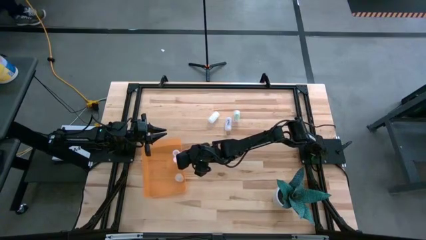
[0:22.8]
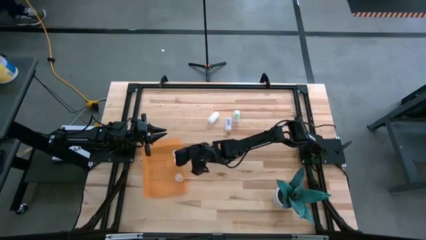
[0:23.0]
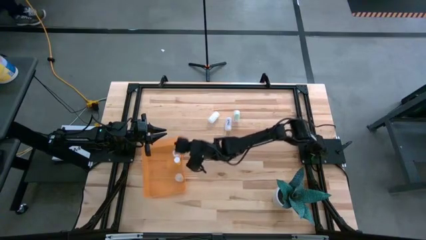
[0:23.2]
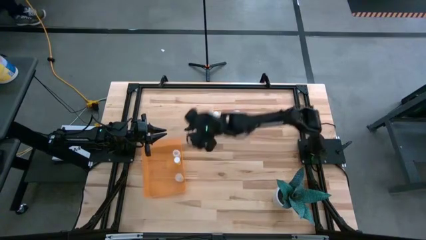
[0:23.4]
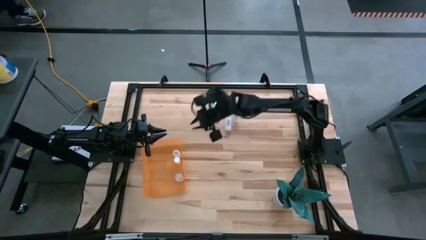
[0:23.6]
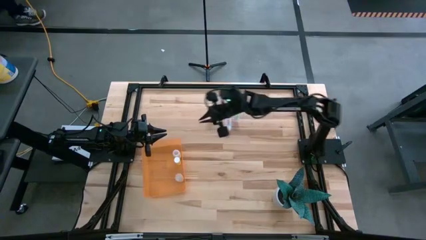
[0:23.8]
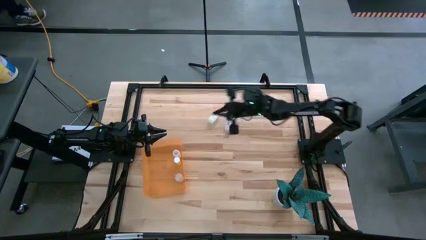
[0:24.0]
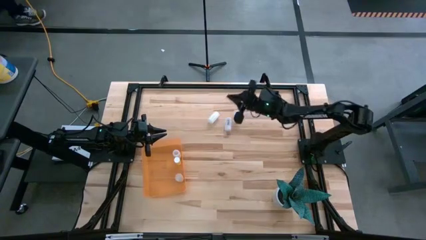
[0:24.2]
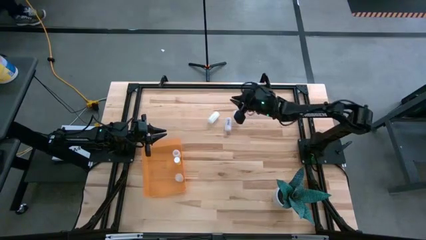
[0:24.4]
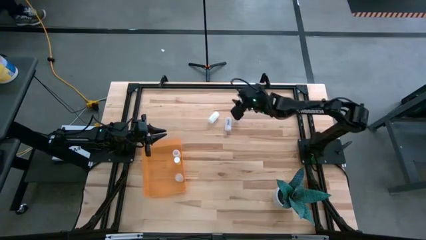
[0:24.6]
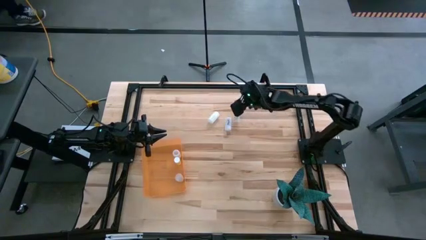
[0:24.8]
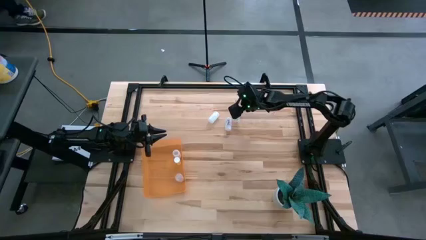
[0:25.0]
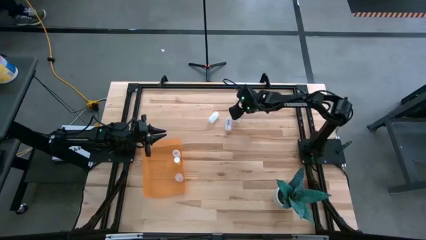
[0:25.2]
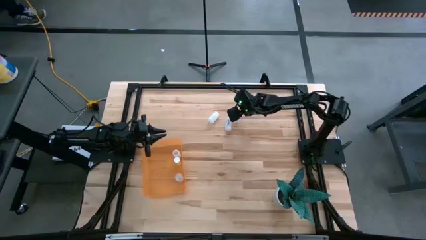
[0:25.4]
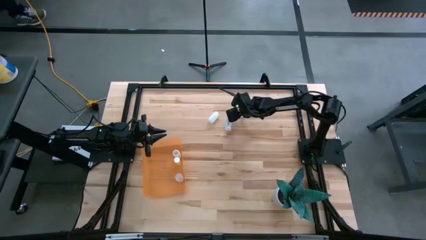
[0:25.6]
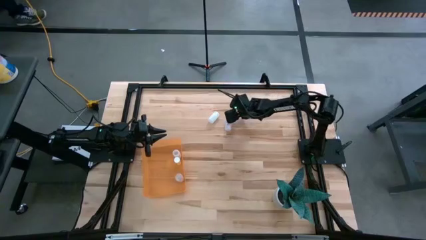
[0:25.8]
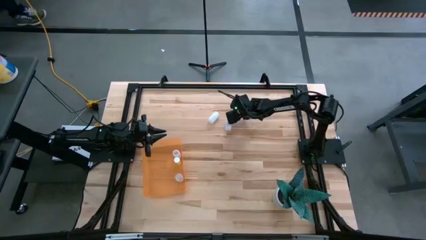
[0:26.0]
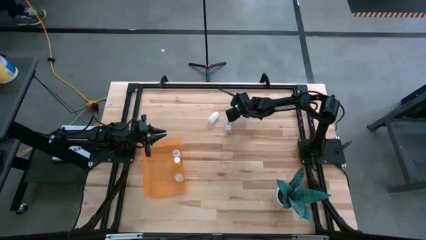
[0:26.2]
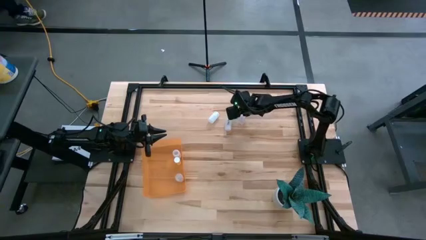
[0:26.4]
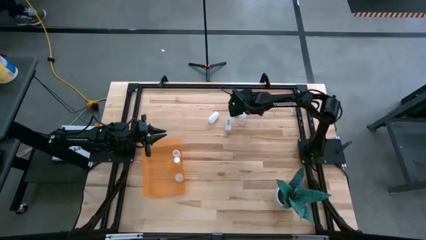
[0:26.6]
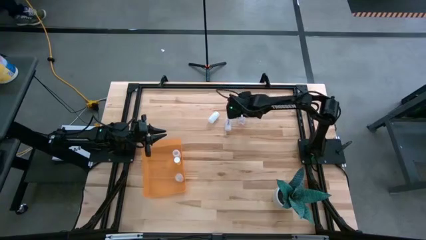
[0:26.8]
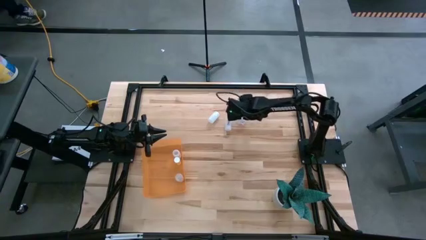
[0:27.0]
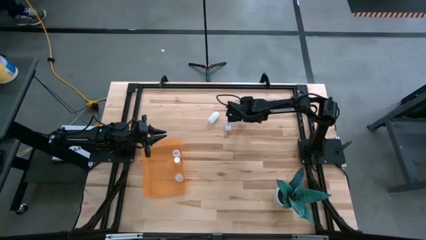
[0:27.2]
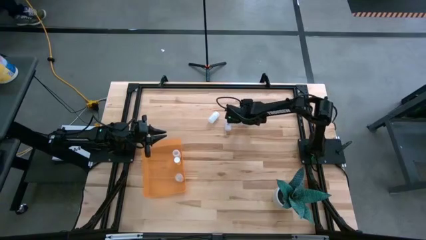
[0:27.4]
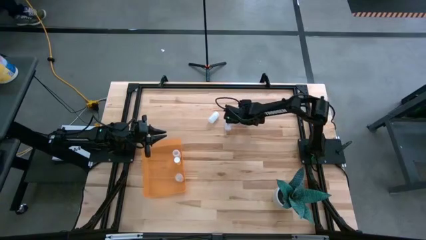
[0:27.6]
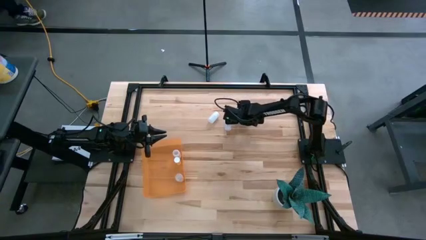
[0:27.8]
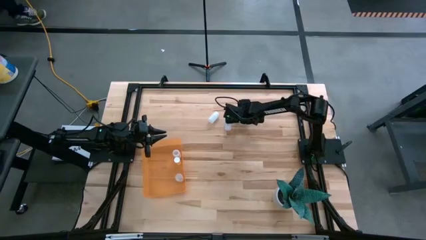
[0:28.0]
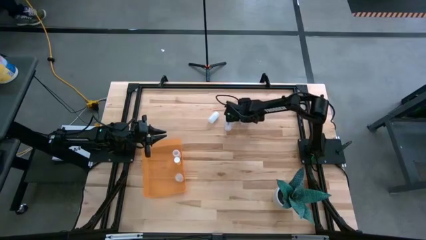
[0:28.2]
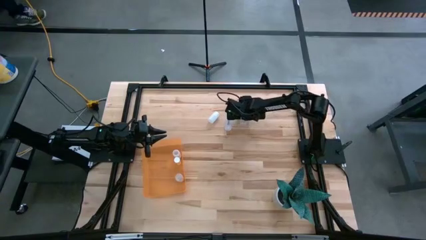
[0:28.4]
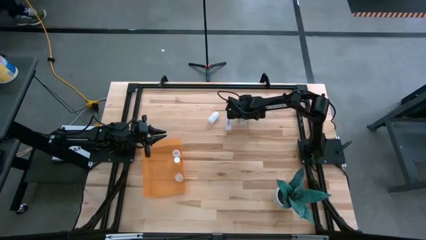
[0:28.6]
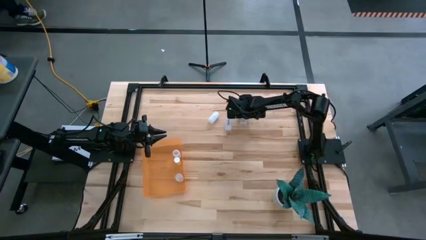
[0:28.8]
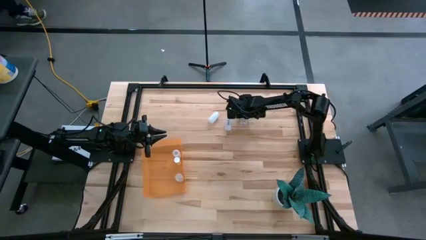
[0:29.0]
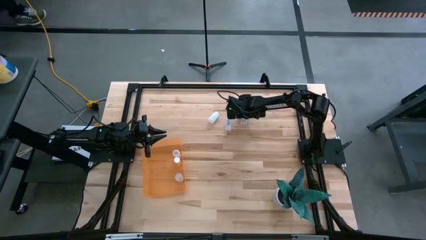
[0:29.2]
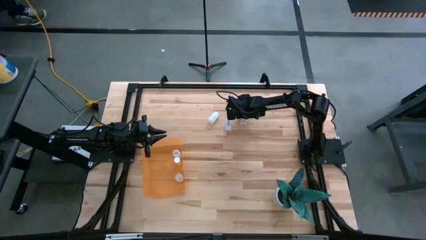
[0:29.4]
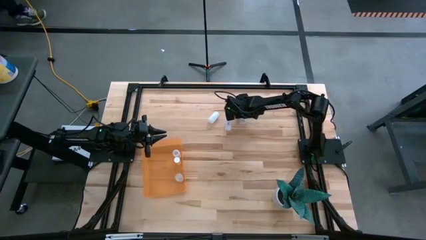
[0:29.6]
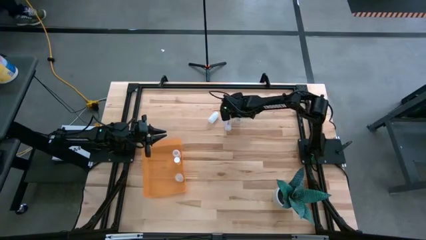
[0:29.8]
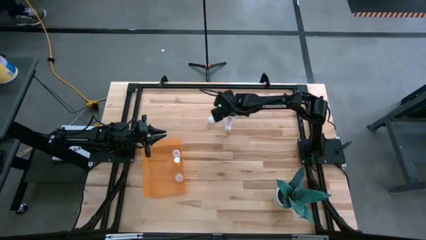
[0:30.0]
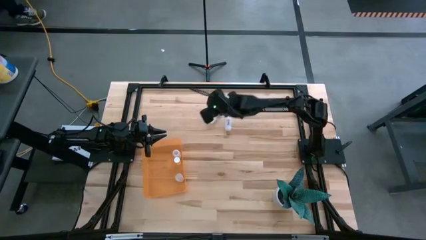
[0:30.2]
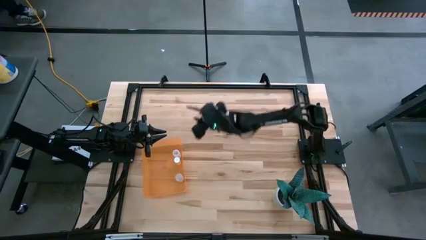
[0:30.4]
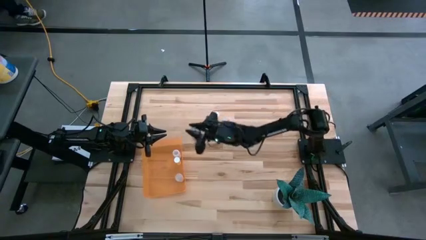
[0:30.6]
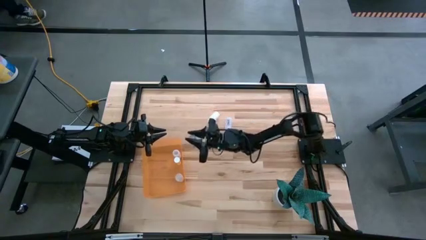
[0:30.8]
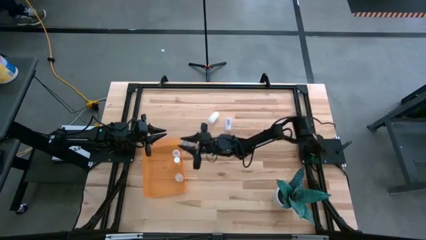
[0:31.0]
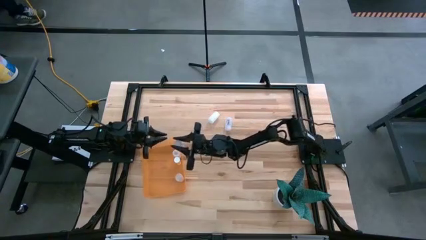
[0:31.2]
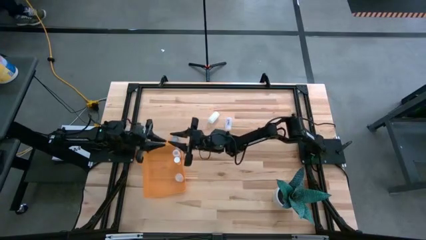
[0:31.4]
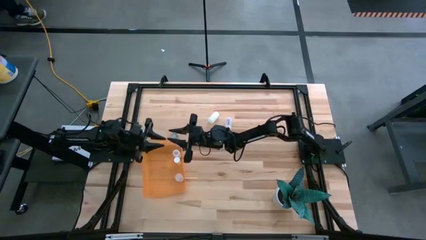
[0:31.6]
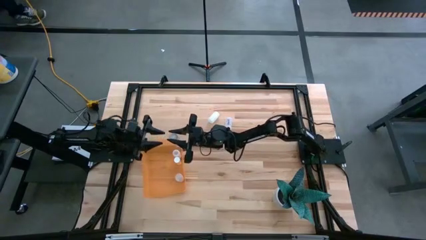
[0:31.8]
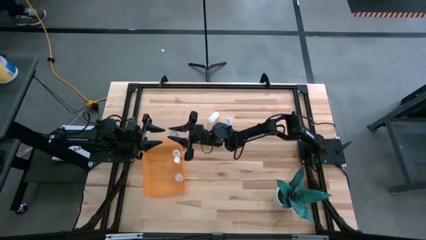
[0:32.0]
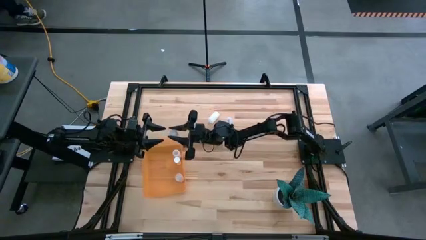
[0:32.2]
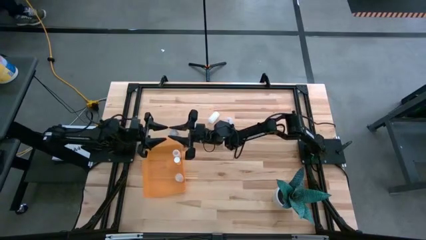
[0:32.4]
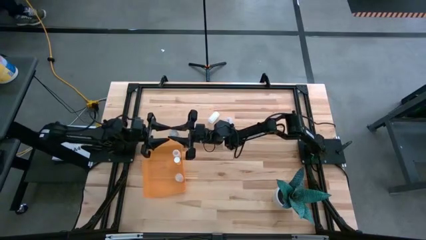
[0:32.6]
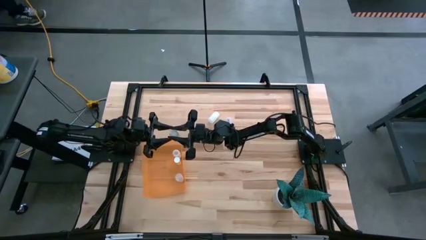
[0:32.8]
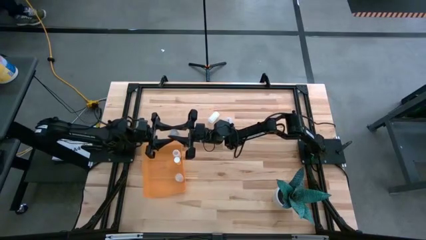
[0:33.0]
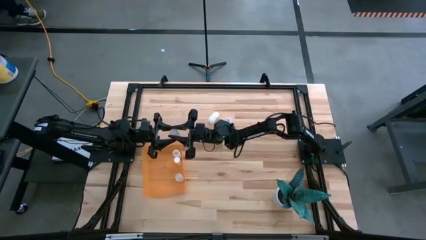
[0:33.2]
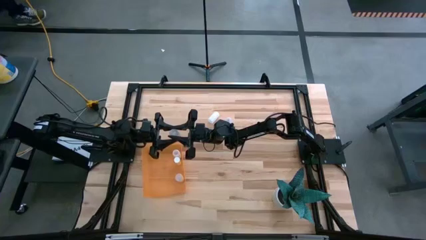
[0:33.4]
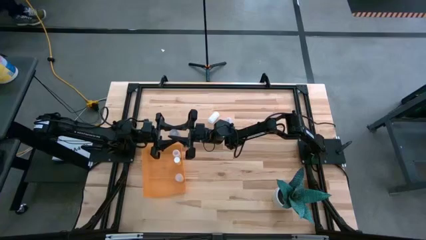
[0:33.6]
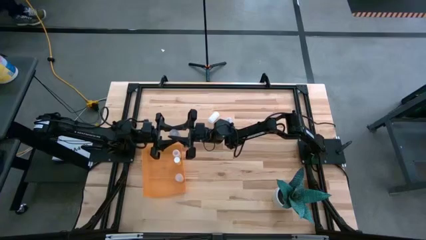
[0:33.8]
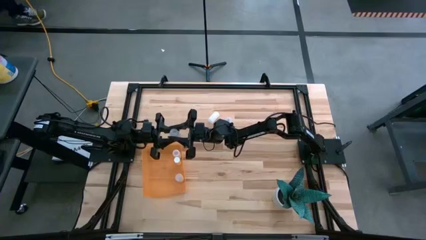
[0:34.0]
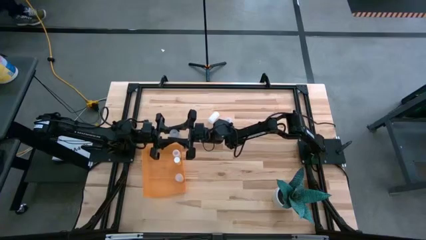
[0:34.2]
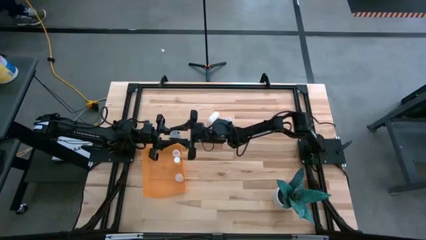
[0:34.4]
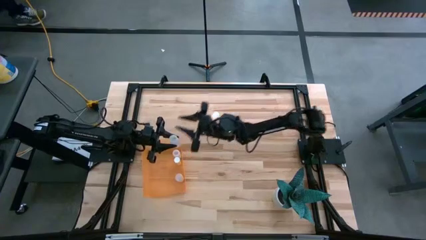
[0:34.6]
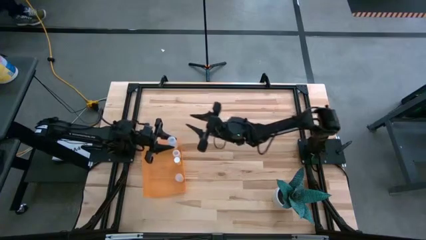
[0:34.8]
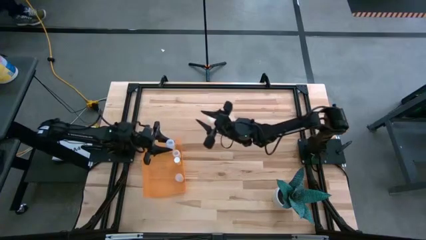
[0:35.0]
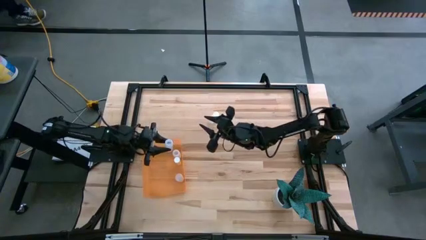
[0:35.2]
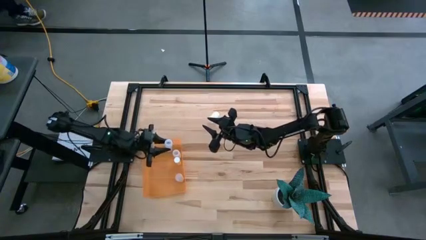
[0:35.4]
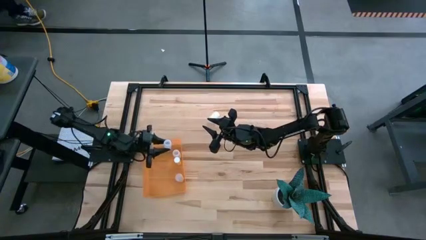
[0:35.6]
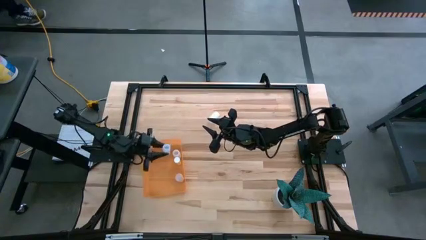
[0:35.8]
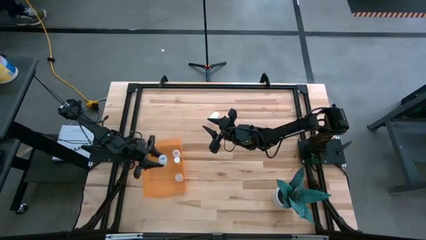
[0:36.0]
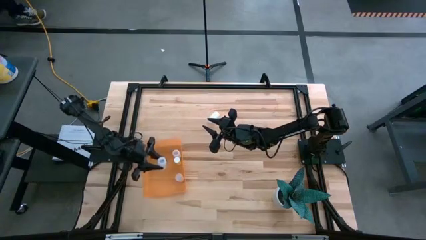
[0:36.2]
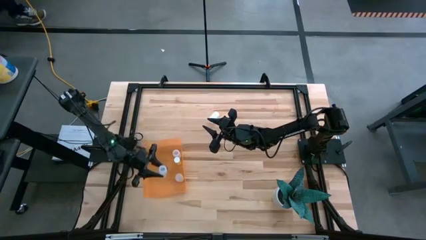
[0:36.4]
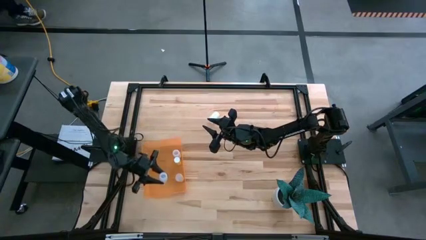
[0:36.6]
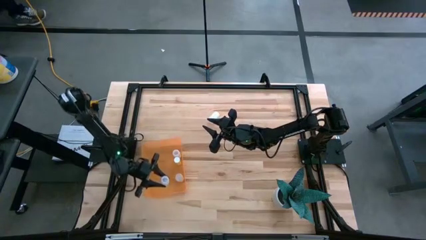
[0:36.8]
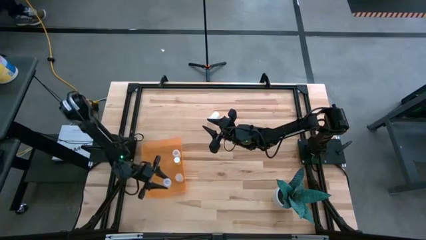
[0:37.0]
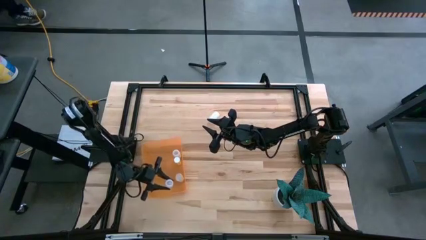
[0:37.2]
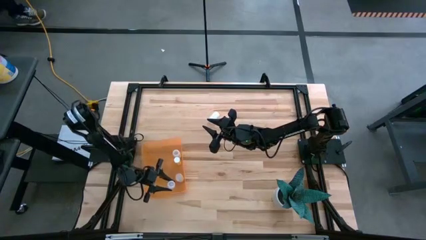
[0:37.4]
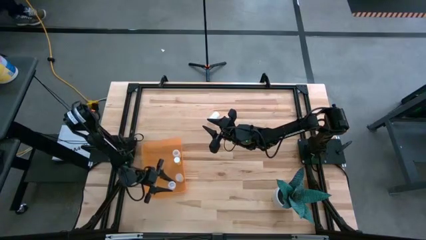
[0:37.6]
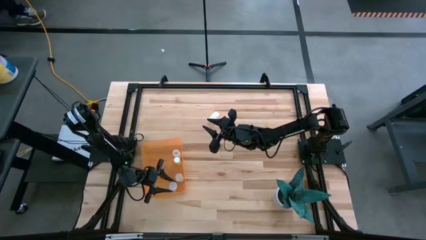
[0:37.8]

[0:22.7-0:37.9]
Task: Pick and place pill bottles into a basket
Put the top transparent pill bottle into the orange bin
